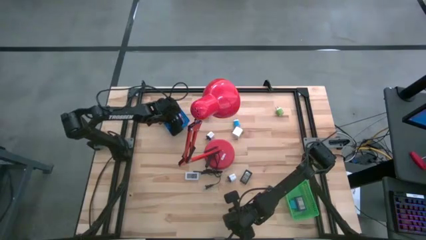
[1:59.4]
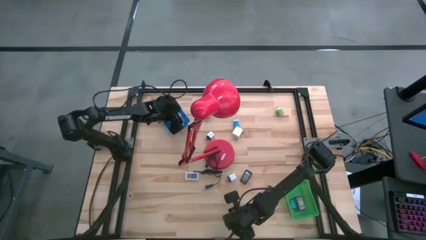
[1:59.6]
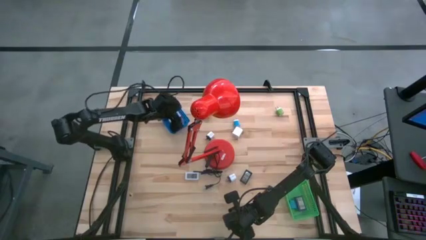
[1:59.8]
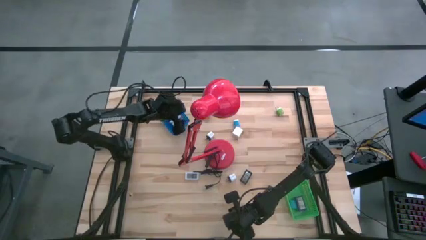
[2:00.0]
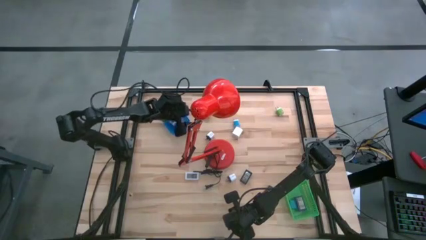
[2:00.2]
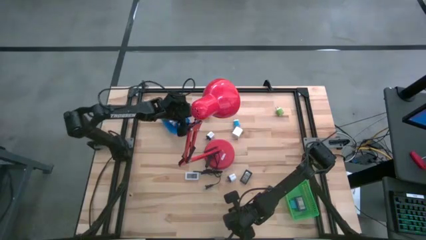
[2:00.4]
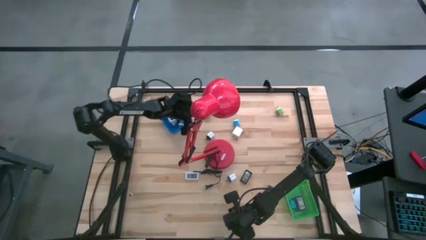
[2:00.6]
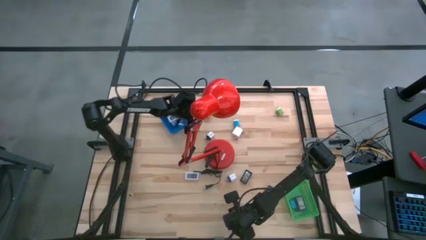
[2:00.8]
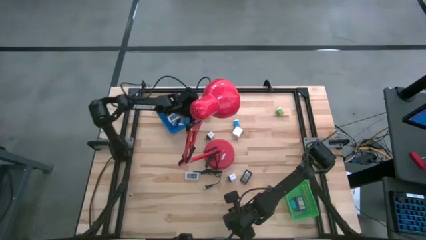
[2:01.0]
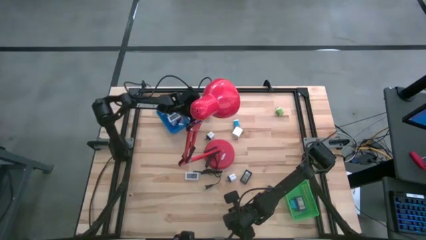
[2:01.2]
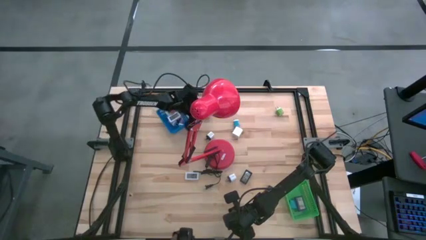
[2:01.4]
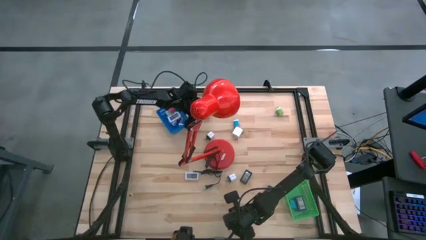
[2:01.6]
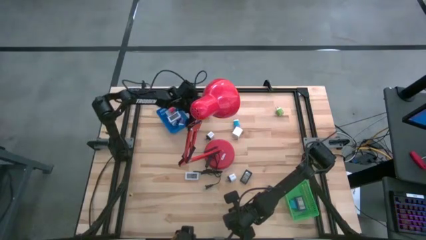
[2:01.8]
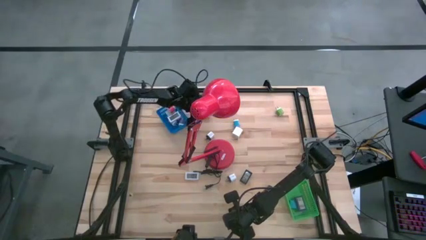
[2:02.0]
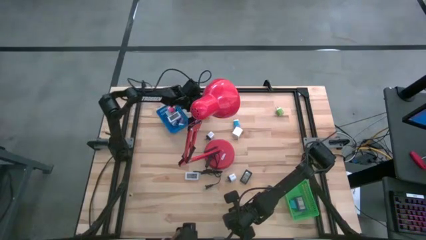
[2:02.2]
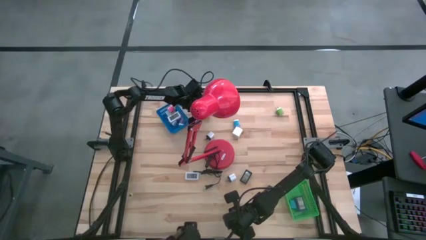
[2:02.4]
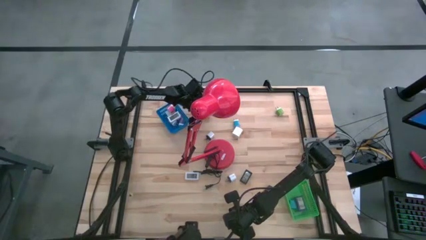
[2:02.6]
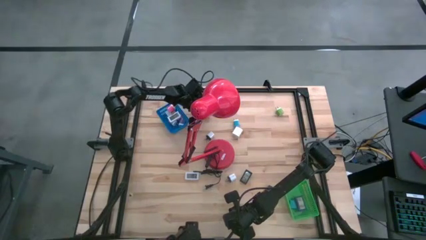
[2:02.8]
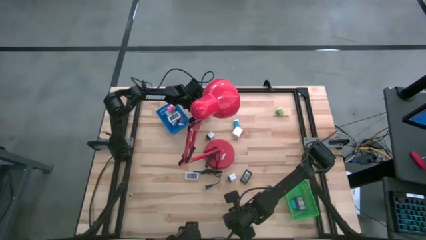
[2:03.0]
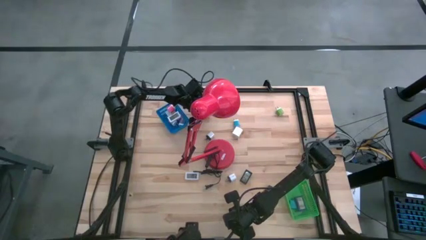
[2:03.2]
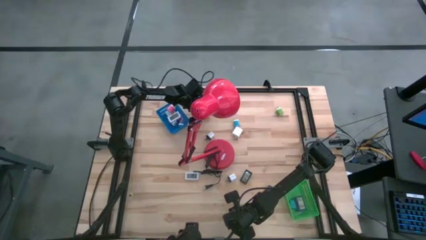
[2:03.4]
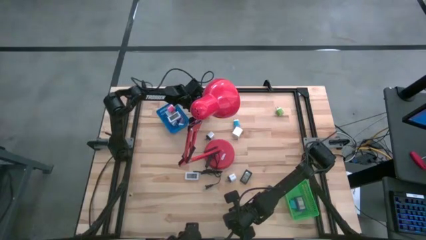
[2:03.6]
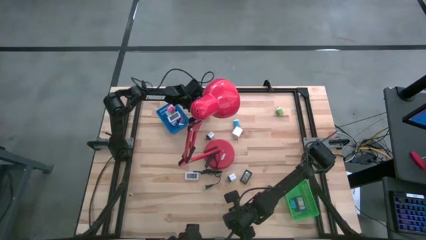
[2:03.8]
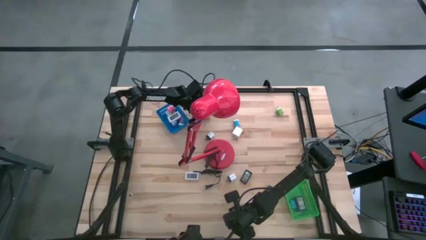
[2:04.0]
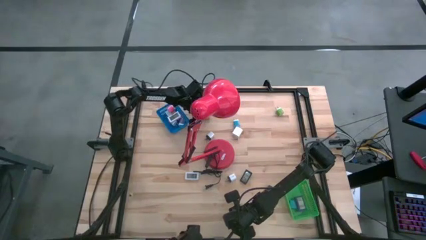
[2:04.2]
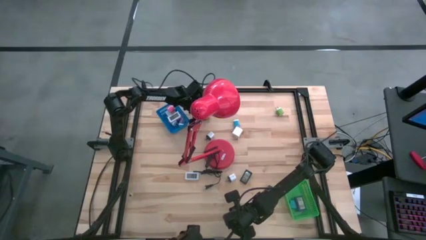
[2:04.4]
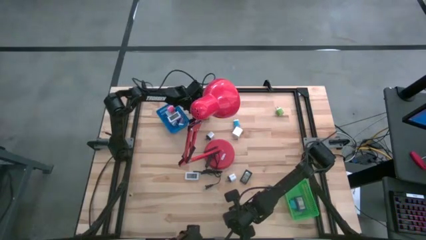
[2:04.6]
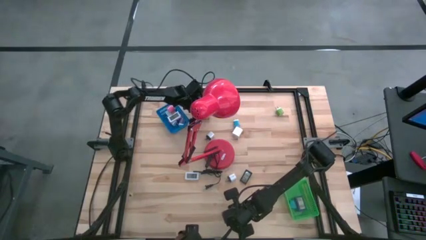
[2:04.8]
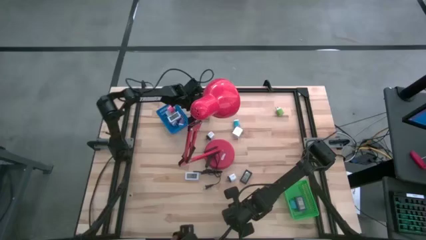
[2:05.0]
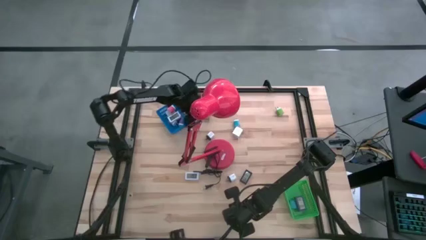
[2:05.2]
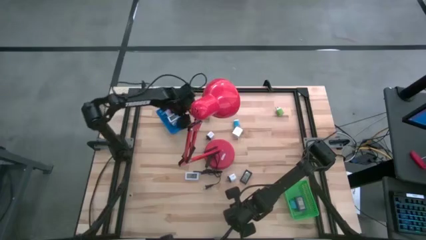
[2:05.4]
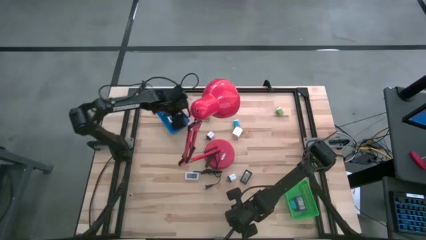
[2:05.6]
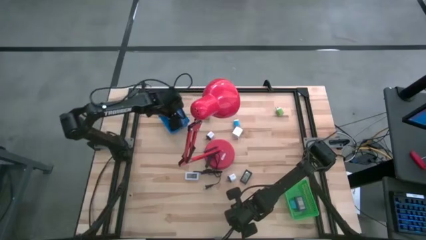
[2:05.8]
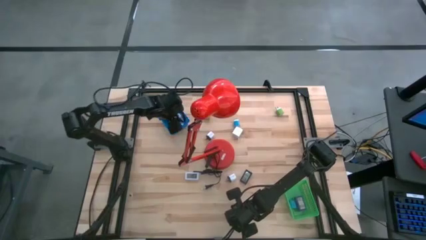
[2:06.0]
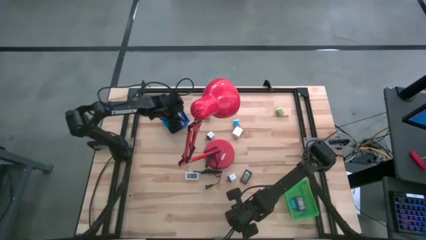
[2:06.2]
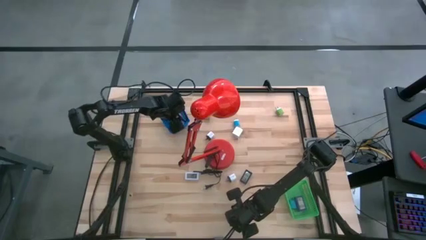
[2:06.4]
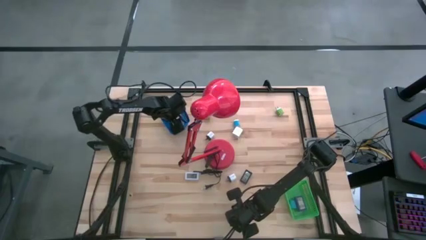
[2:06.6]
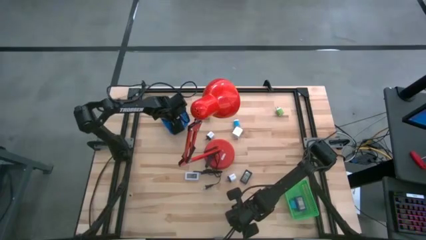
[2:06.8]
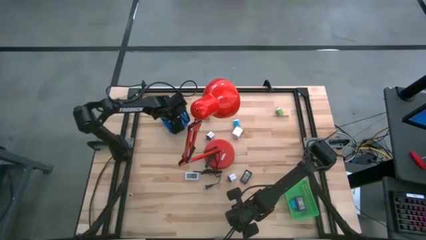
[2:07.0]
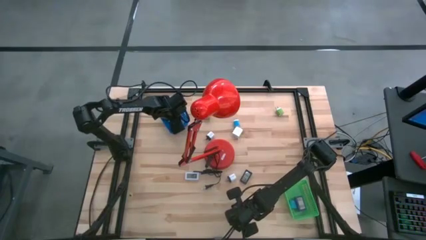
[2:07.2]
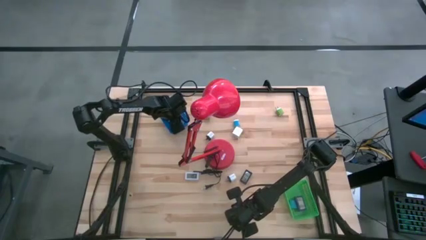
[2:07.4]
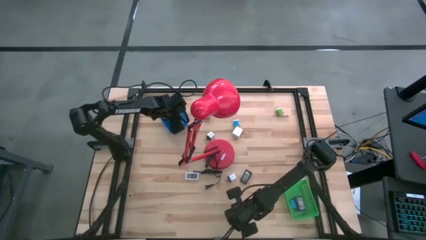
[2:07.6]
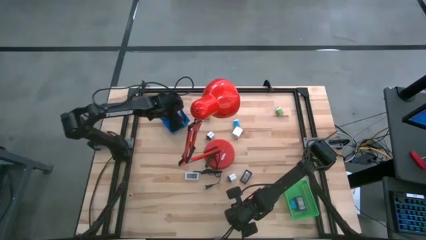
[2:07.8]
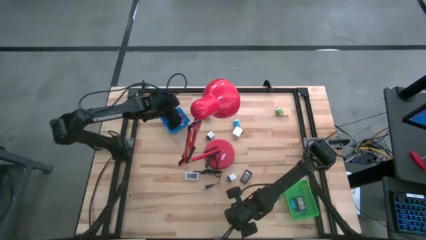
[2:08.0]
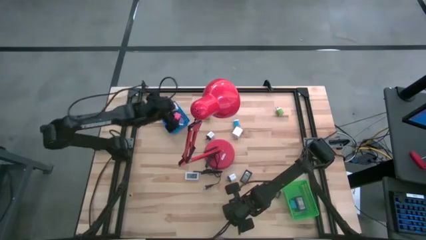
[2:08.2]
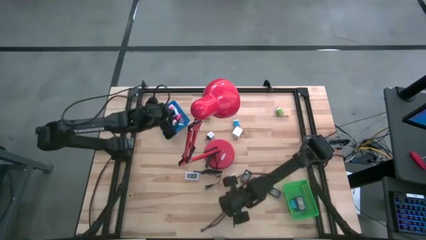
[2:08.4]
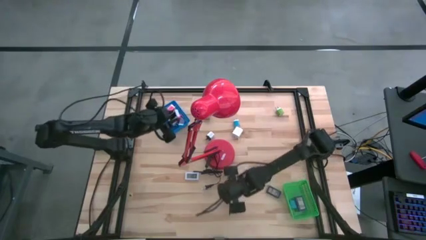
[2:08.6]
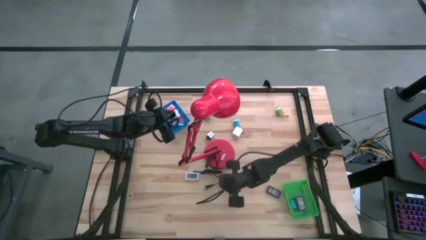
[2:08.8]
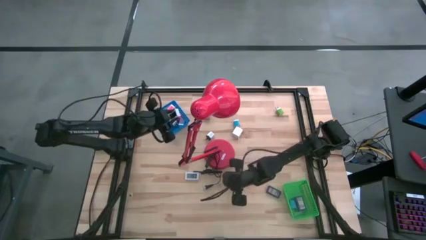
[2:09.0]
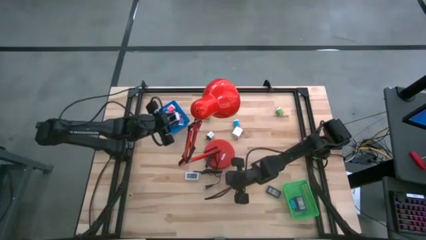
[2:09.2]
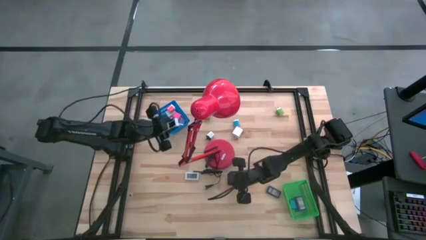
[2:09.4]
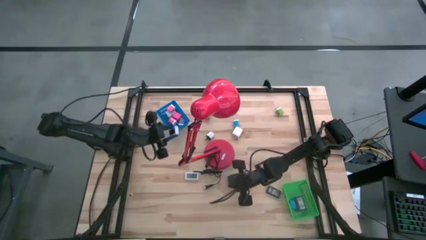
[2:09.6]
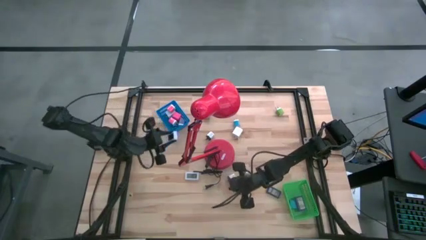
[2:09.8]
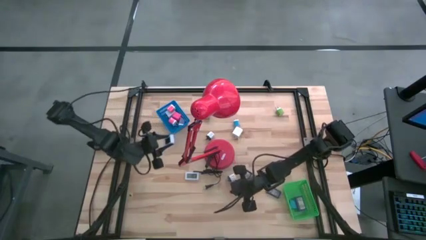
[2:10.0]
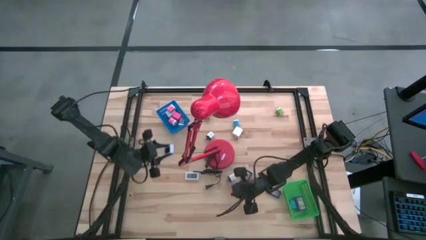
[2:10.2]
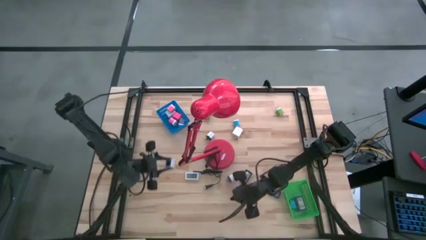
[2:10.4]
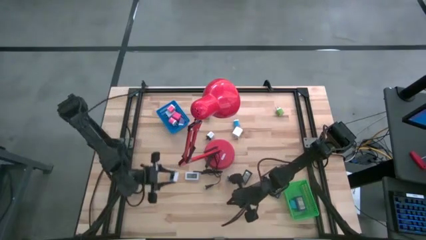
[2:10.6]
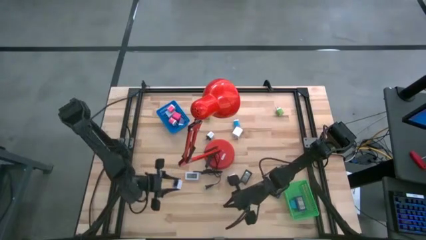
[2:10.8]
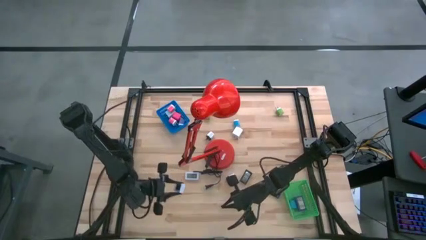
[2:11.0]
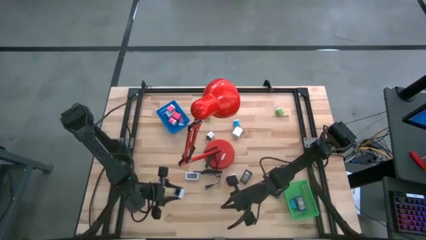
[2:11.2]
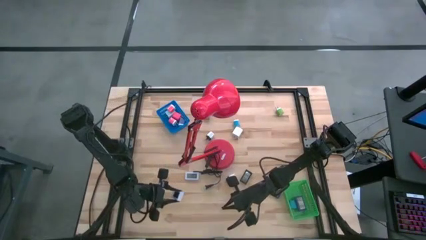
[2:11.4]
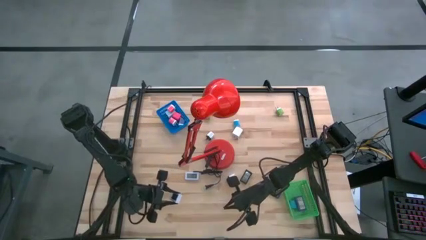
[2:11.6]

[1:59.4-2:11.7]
Task: Pick & Place Office items
Put the top white digital clock into the green bin
